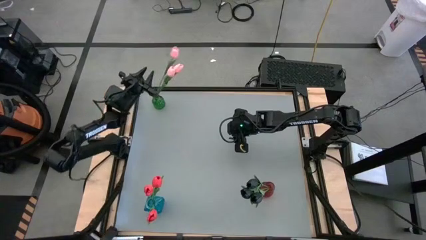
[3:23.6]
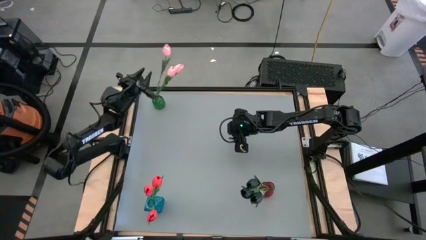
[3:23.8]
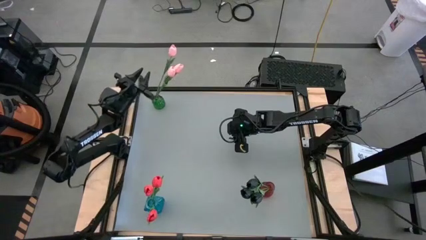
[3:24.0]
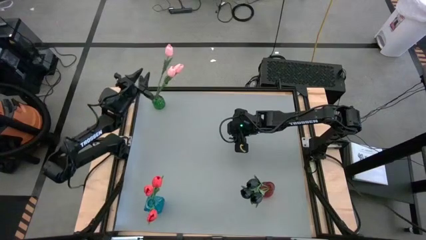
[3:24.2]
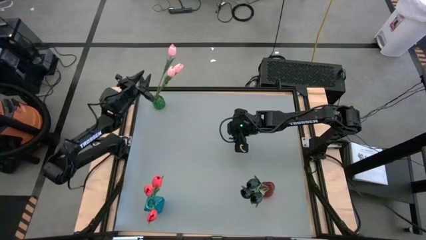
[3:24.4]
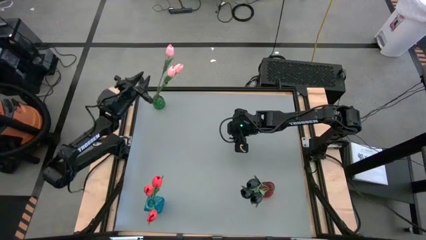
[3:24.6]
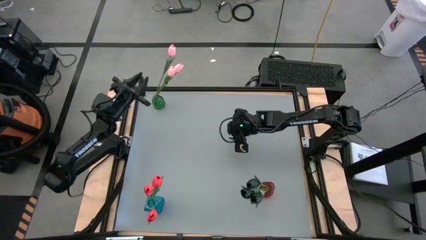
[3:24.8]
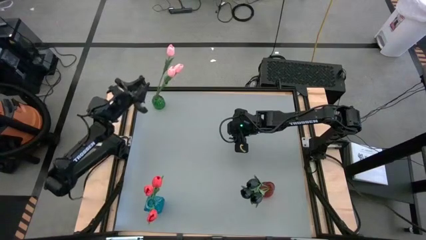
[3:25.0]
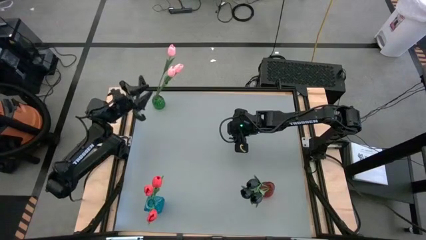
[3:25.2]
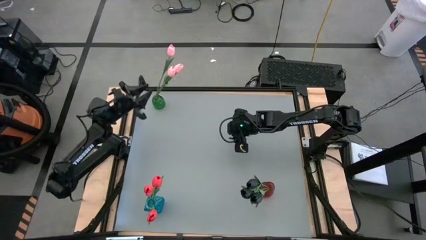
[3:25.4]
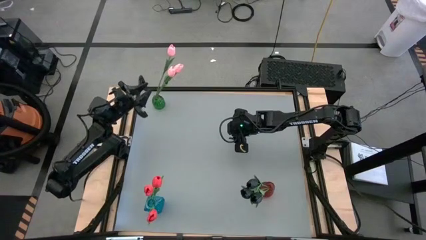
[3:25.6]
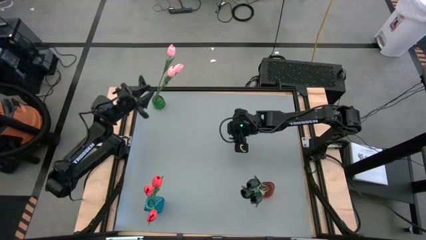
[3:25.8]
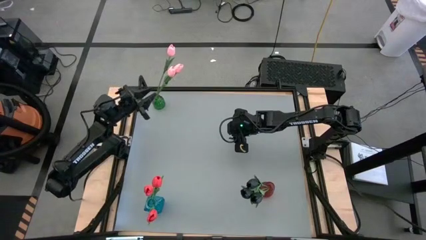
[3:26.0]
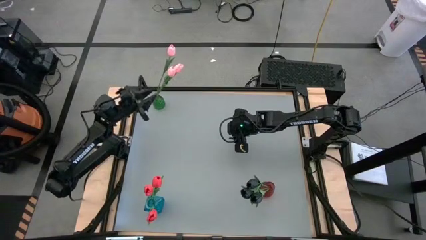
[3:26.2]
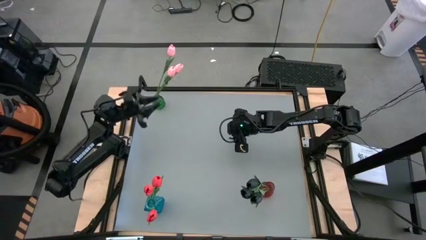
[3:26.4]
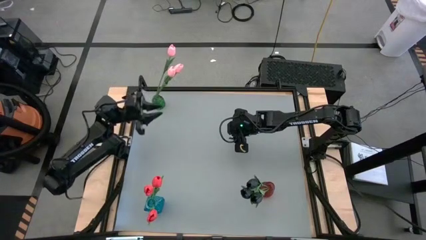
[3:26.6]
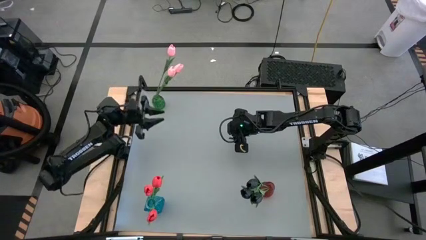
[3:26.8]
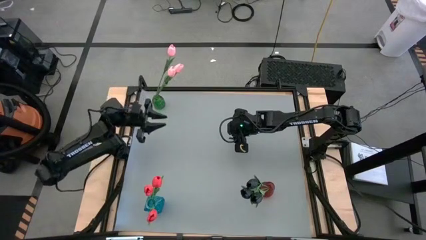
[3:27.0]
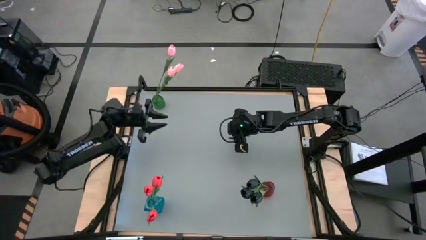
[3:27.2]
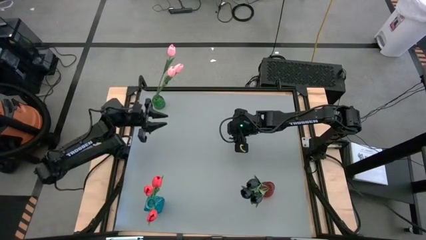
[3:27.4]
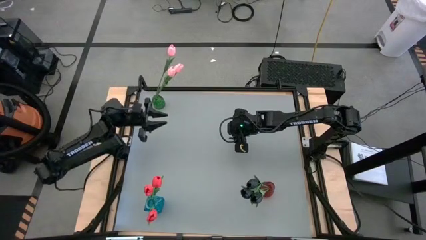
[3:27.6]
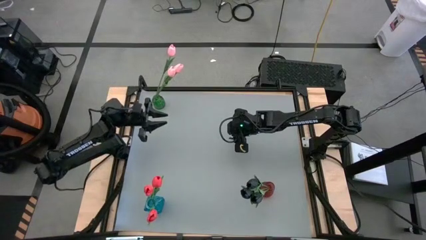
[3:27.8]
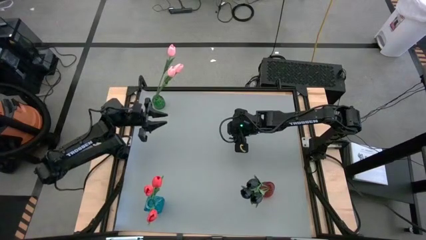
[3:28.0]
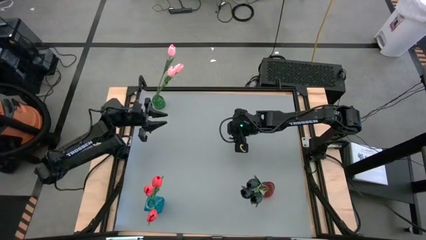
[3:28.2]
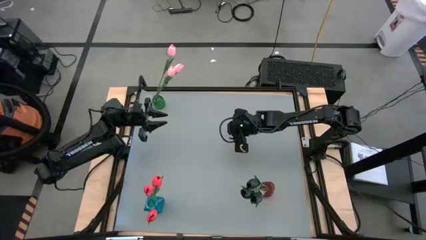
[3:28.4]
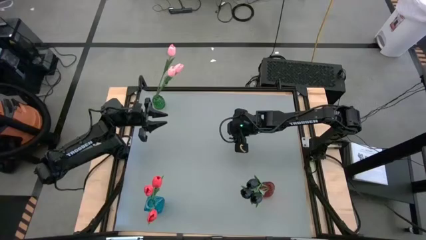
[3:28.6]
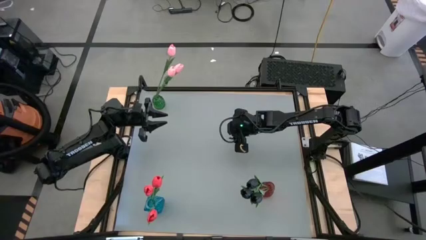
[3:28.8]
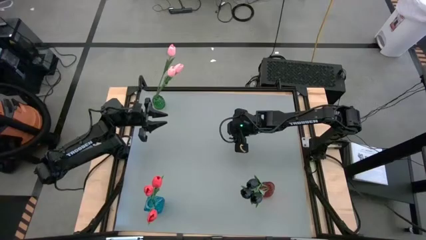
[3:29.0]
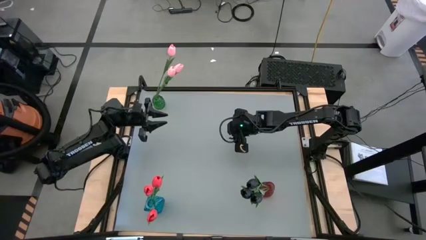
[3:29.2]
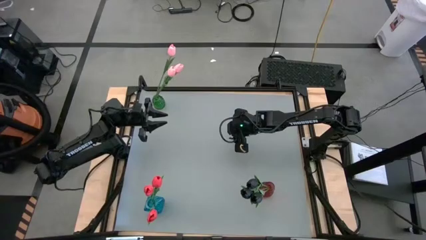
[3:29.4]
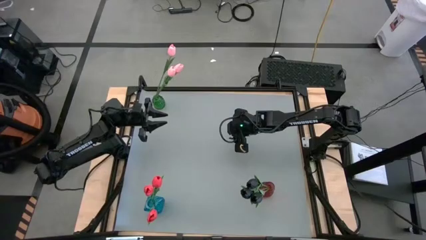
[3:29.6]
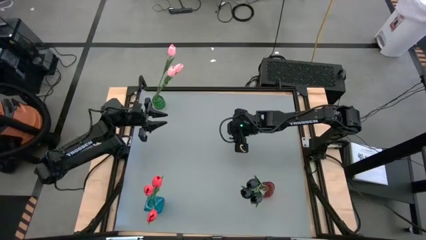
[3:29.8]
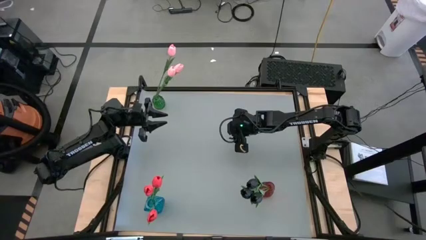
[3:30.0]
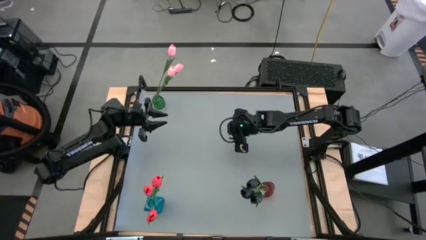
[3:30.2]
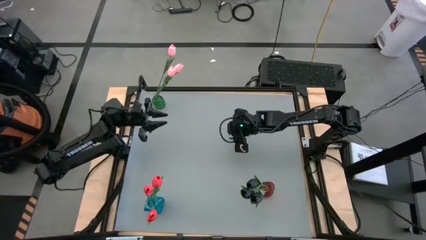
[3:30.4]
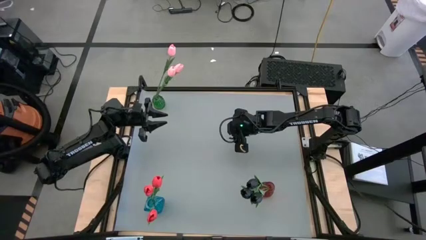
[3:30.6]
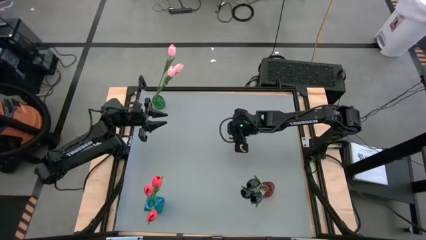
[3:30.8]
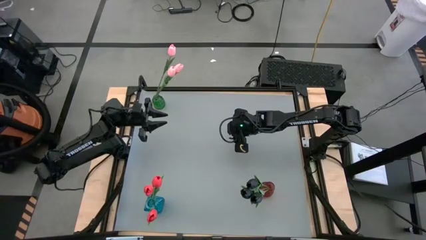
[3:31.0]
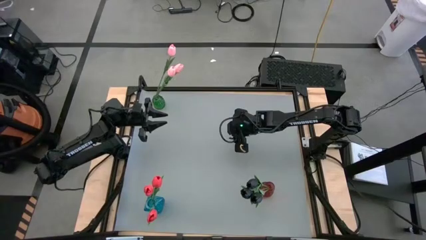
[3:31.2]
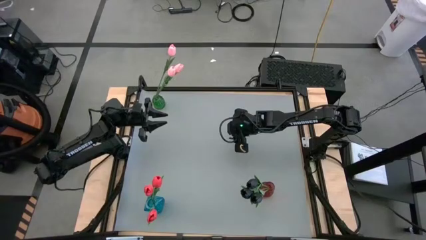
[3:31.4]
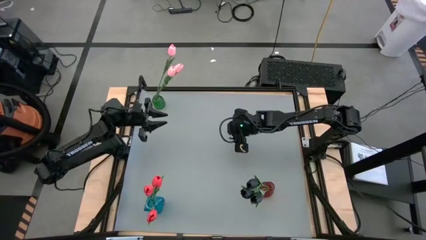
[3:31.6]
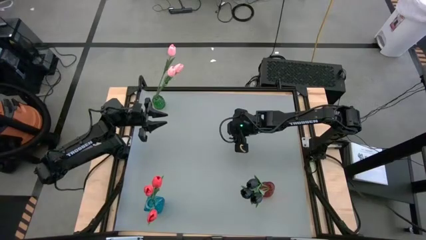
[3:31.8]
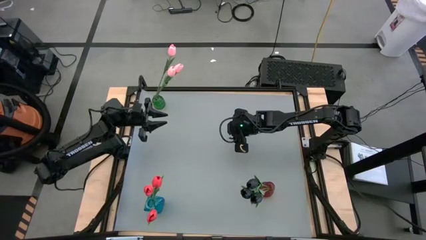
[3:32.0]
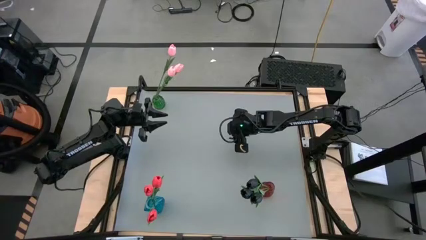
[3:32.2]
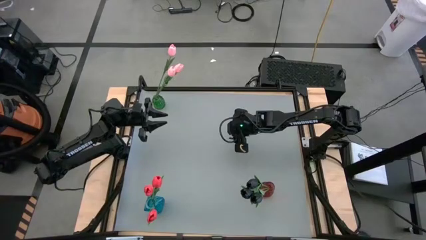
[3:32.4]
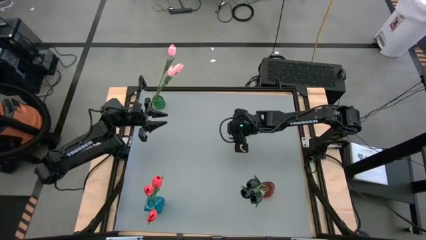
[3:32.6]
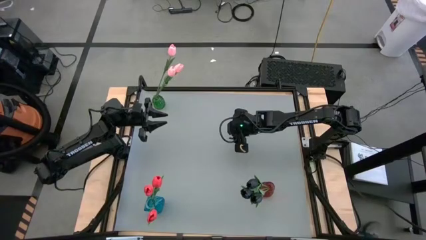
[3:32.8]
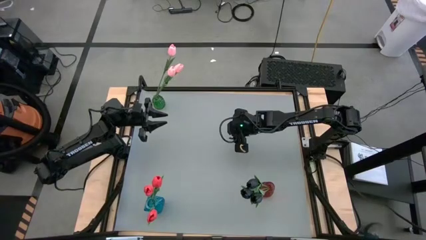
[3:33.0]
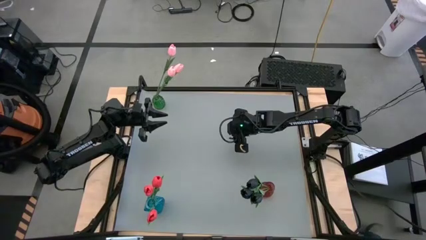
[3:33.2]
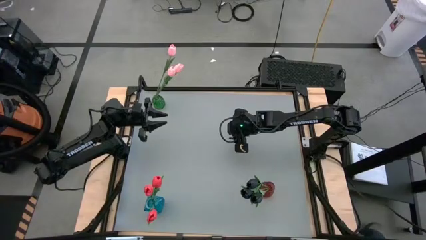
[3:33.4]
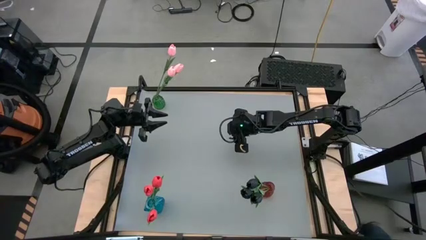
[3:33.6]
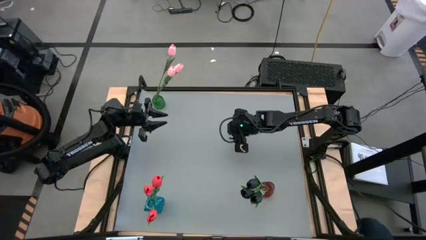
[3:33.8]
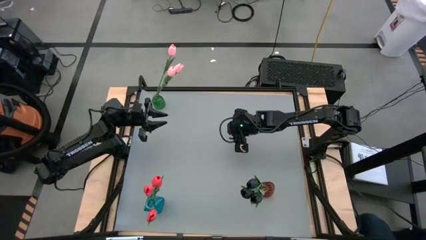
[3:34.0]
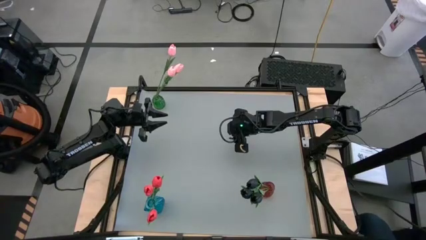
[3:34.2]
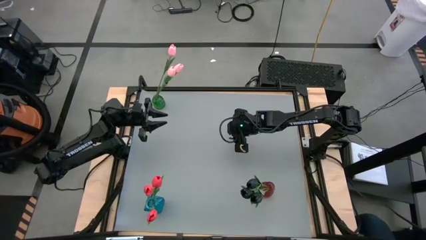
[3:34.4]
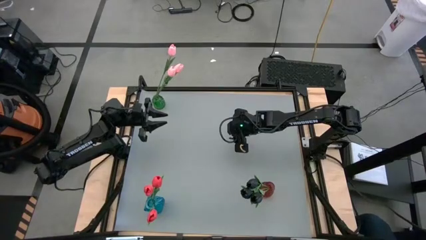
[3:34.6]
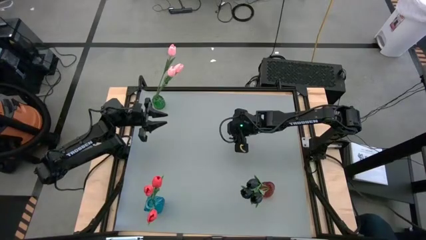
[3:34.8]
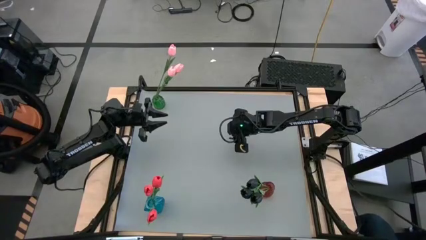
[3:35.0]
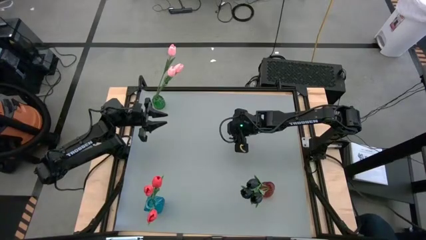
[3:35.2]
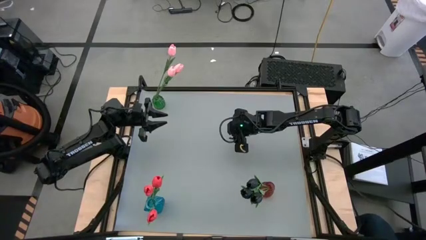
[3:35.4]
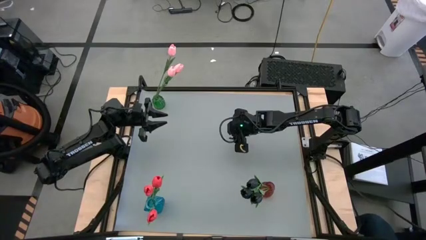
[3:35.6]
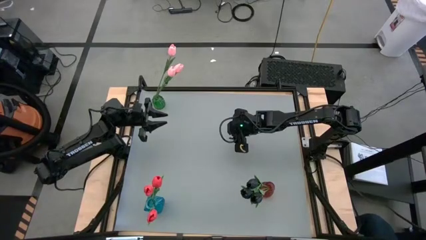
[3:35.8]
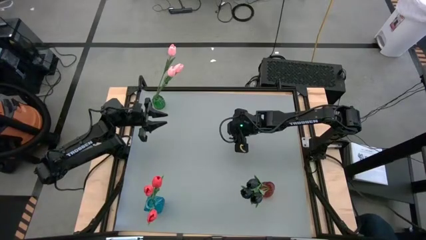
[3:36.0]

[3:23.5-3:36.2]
Task: Sort flowers into vase by color
Return to Home Position
